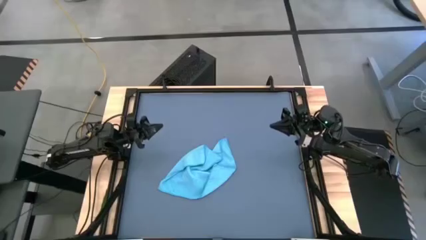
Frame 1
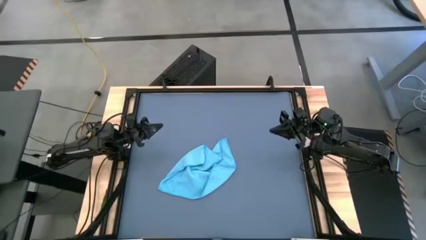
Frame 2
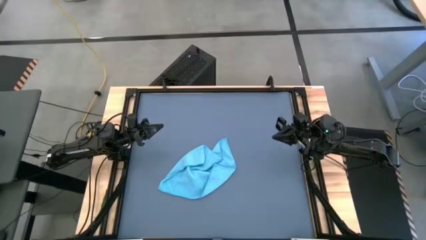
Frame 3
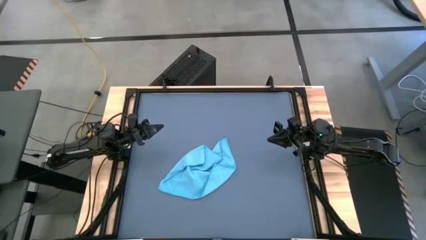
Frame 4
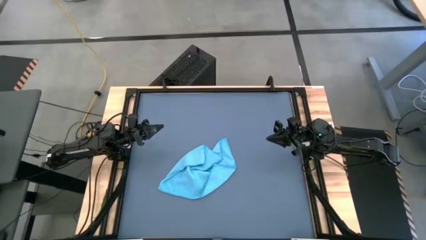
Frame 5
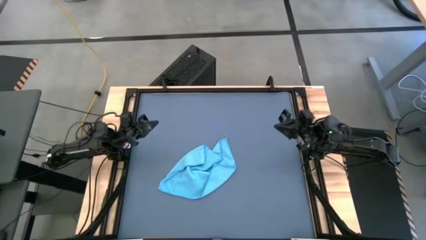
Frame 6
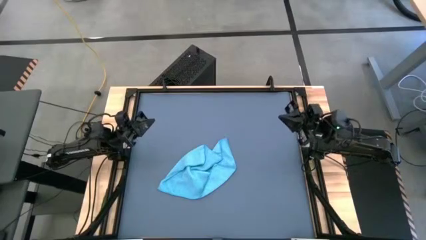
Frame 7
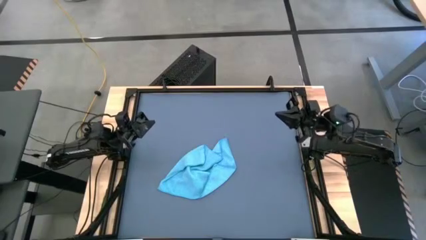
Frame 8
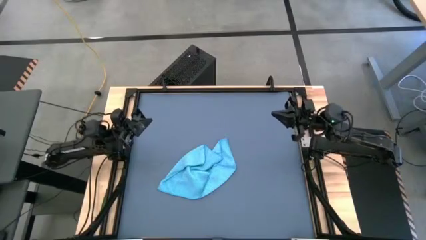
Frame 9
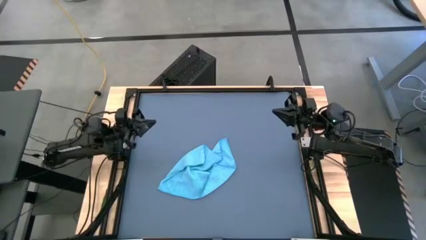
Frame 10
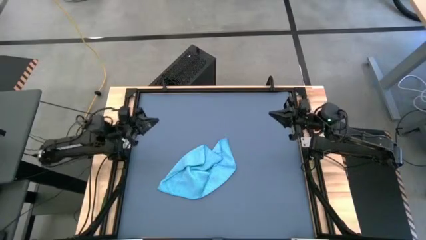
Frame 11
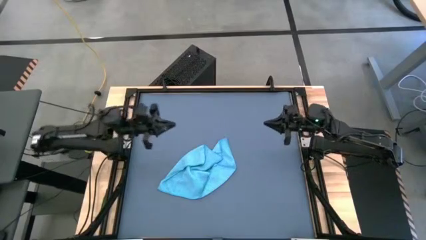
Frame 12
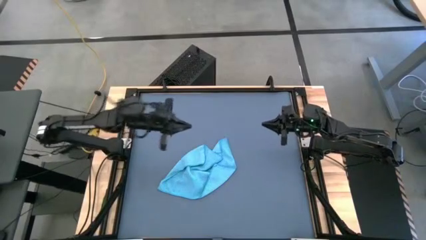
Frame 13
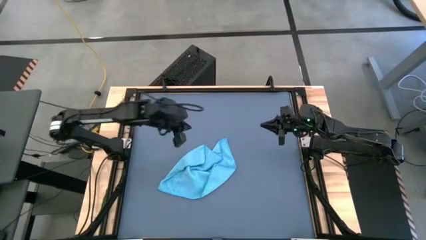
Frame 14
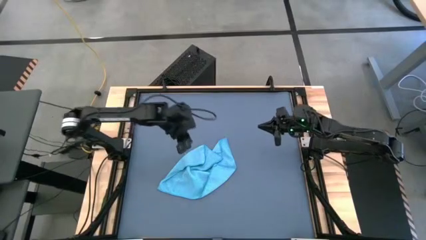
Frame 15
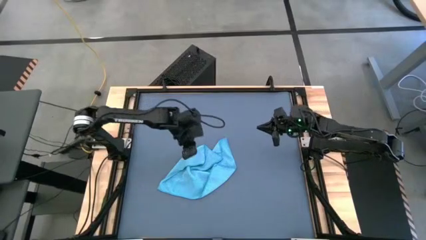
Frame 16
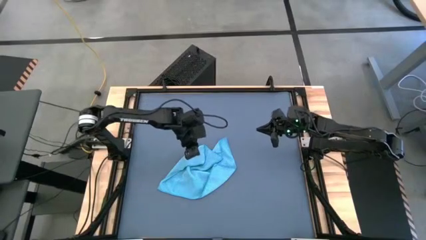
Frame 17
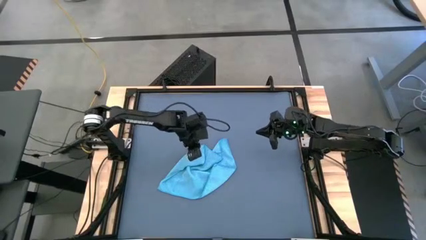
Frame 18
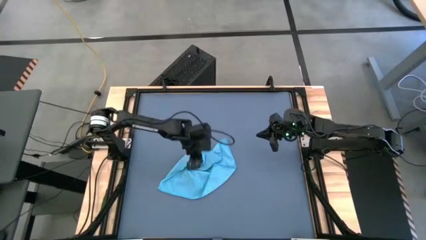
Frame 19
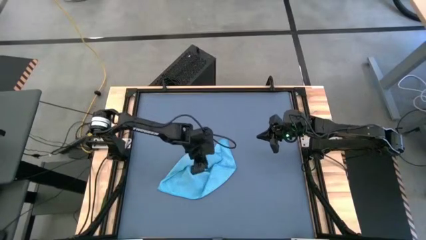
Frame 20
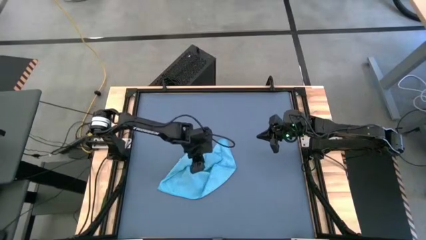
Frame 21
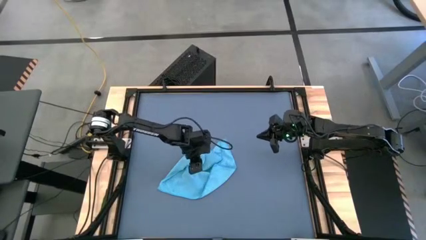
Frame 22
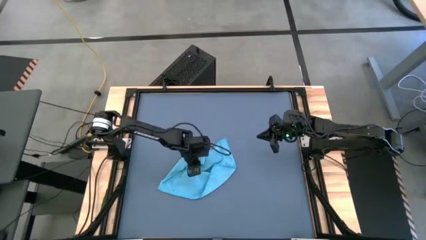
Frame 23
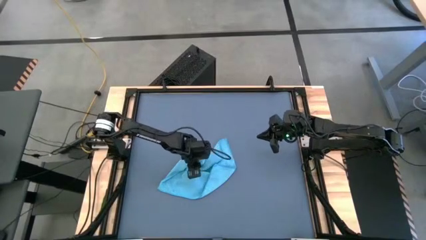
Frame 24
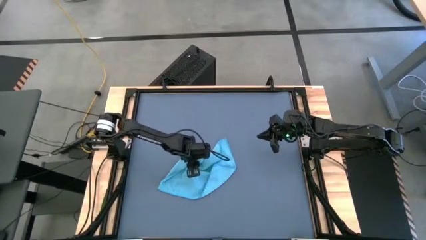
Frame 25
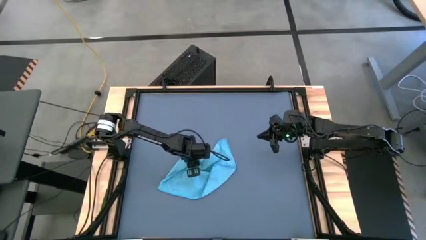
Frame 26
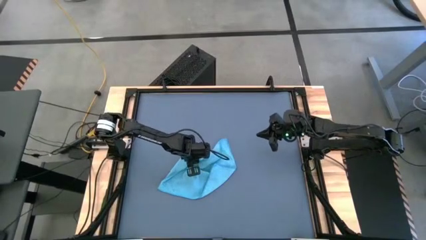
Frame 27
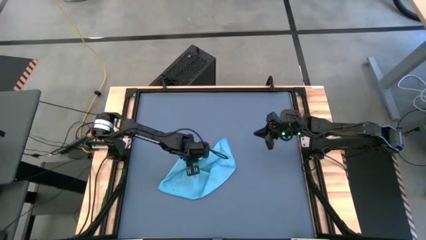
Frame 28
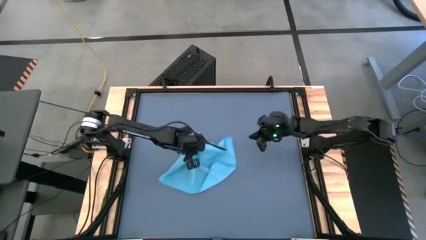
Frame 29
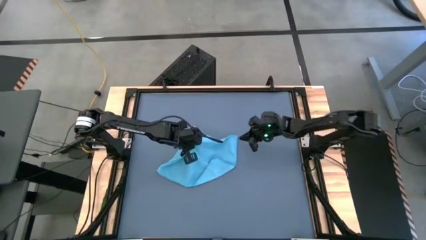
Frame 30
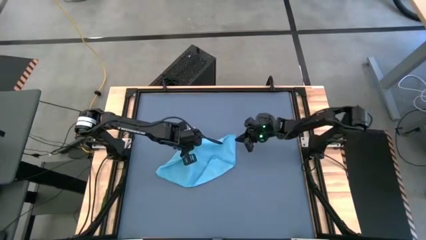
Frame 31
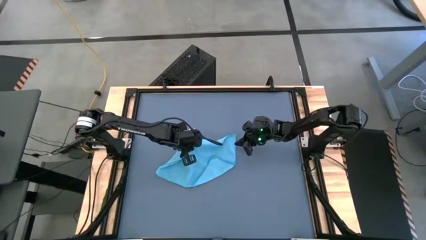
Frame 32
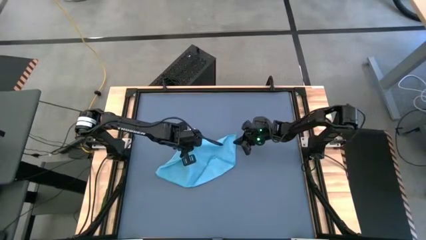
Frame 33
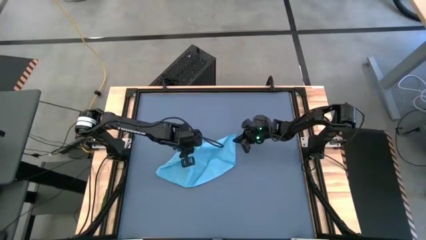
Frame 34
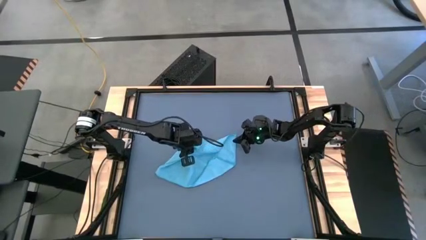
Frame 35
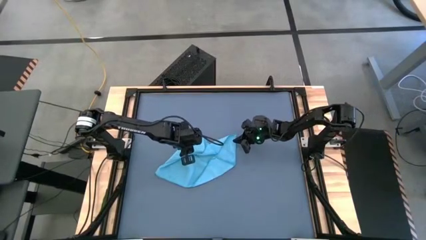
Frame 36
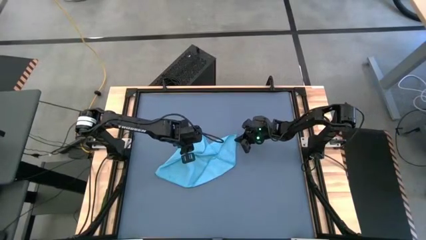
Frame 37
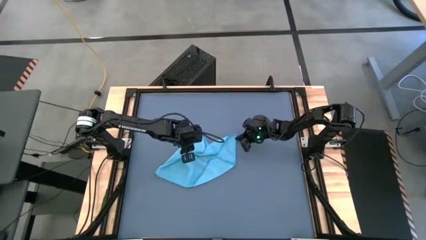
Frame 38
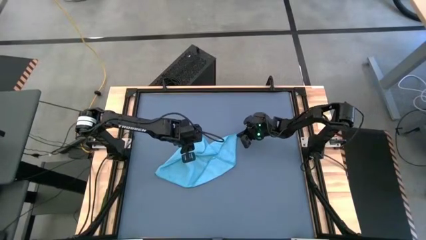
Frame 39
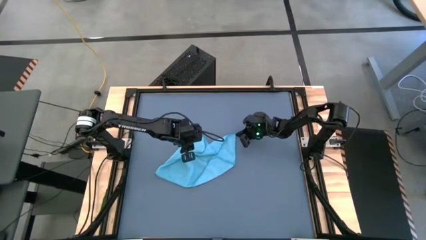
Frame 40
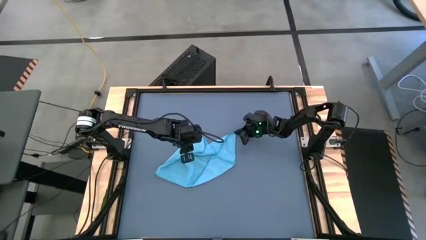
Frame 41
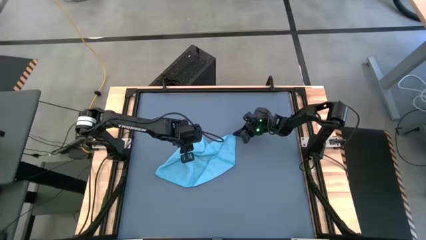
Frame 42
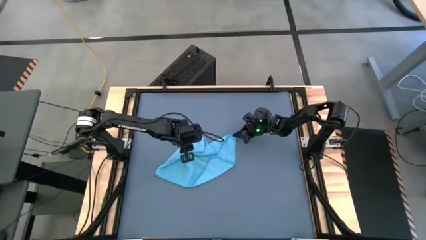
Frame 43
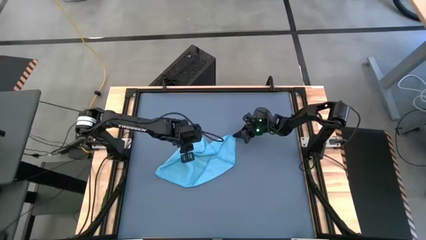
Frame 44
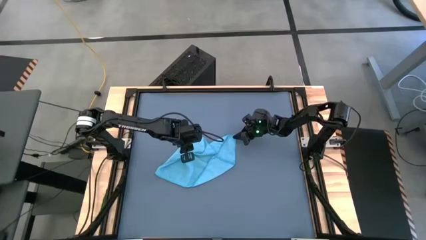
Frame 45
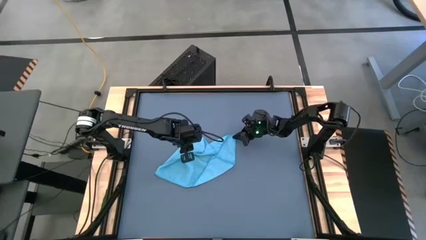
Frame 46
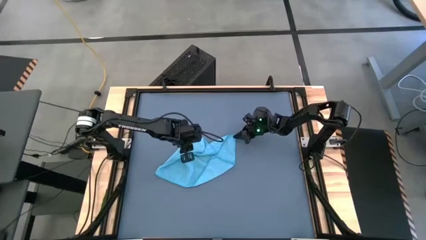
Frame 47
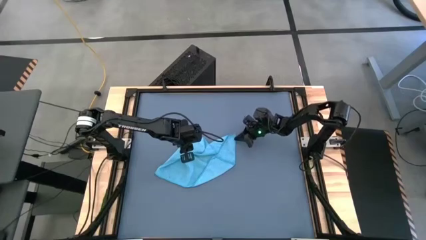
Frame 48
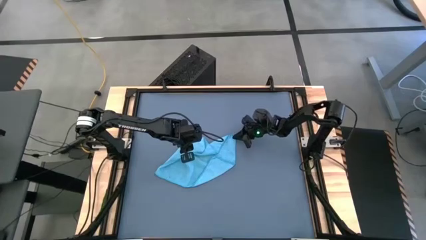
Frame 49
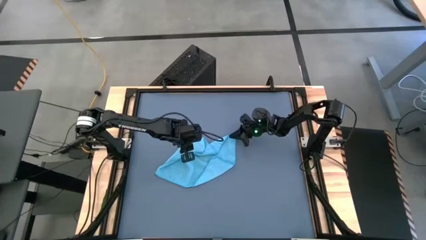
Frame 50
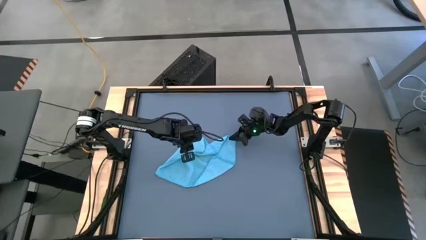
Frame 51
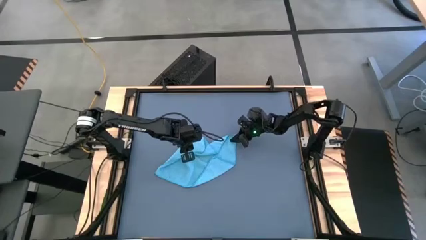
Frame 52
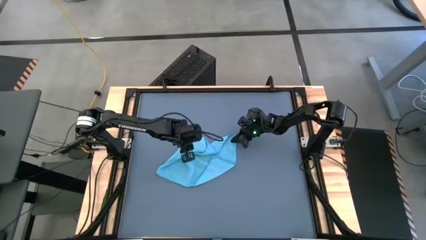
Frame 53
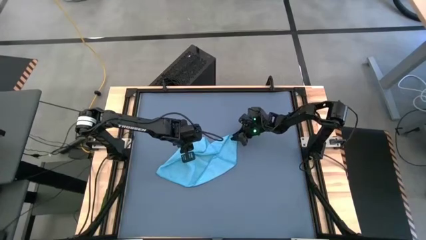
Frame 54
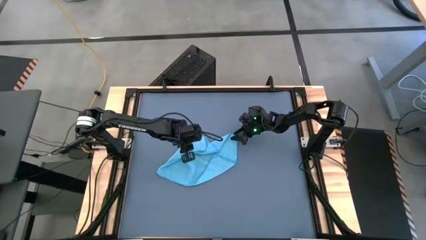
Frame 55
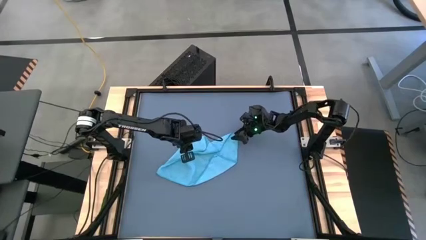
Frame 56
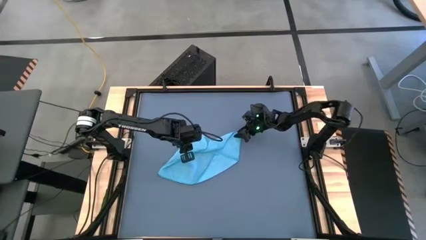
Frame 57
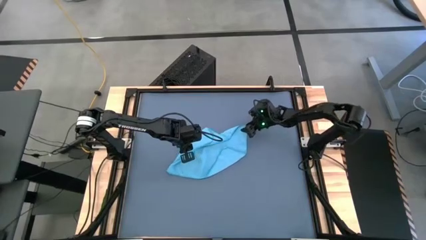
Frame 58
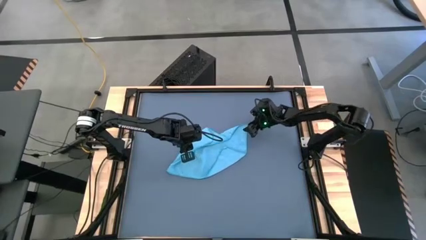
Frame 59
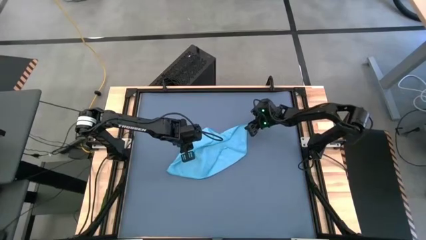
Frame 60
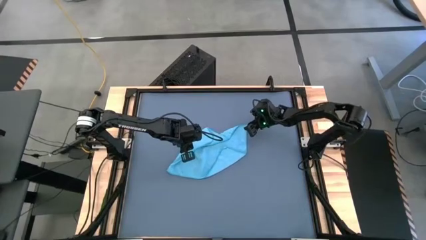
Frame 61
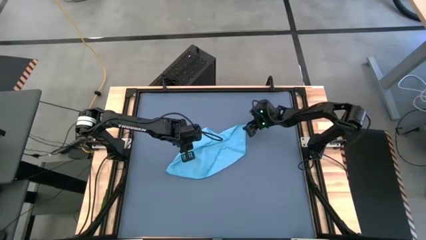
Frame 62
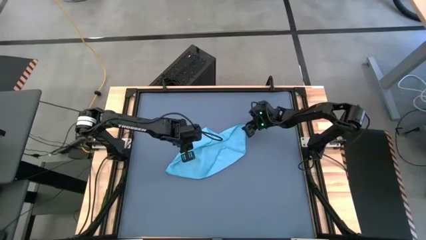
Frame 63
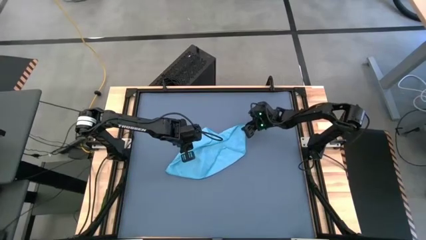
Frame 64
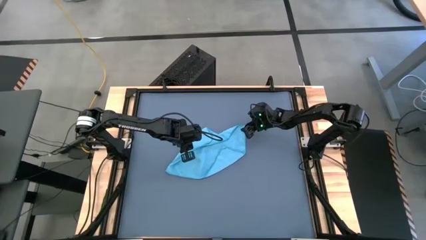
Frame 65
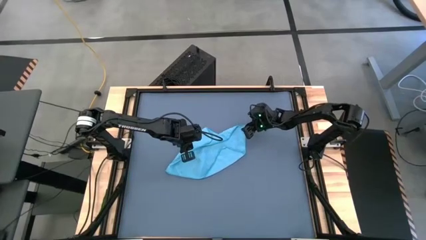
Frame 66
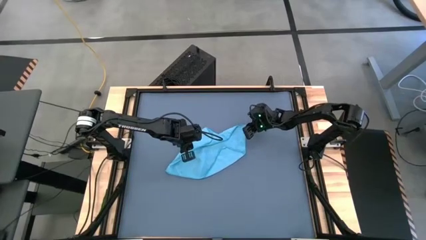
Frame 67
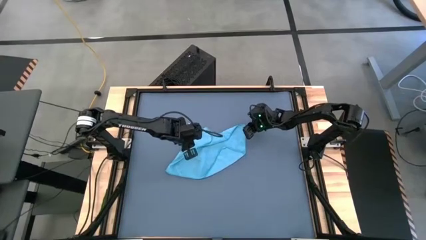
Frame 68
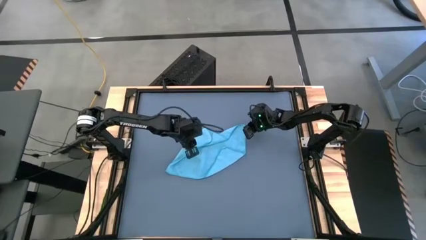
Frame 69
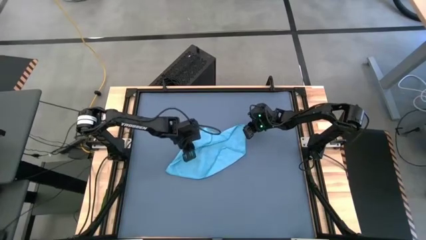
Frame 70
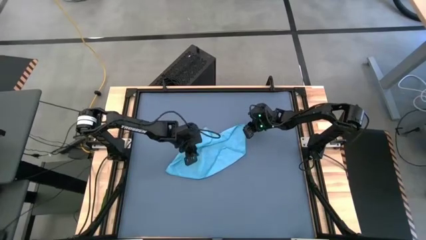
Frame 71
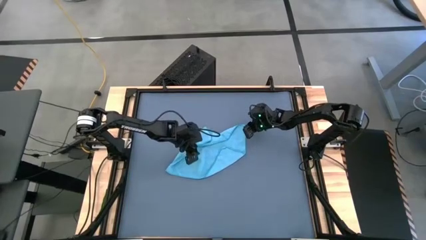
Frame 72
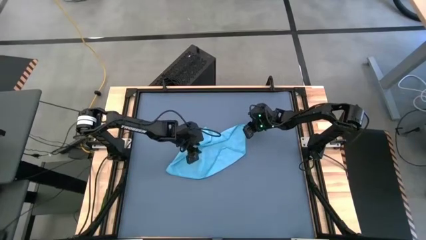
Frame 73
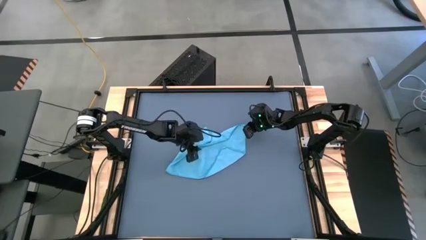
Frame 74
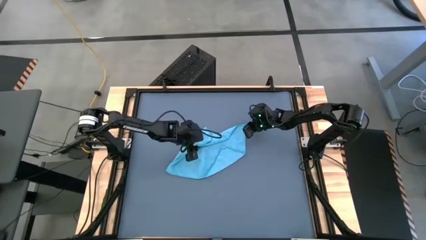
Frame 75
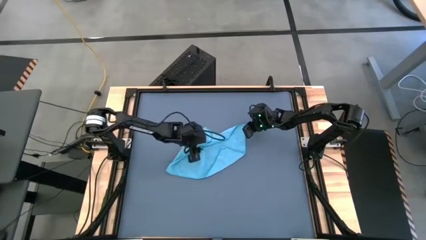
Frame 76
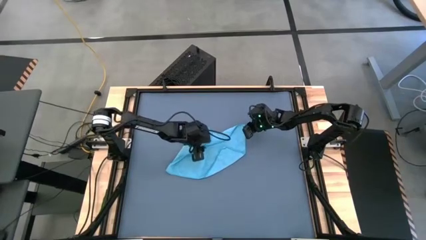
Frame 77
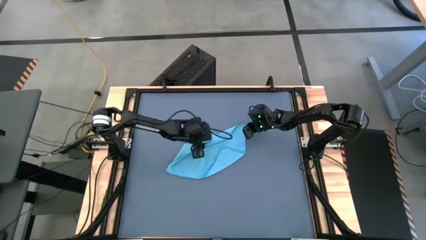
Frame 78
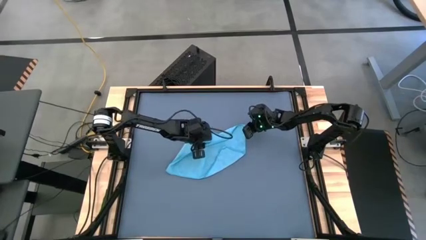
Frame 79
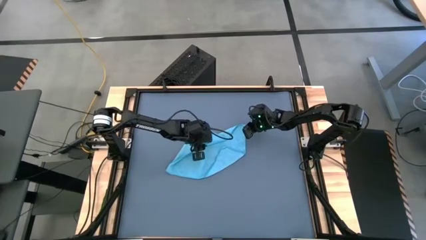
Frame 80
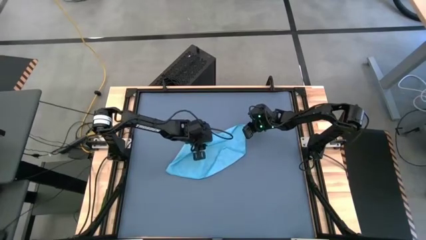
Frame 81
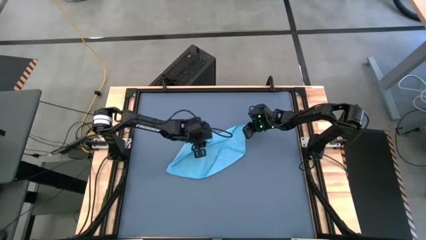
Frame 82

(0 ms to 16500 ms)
Task: Roll towel
Fold the blue microfiber towel
